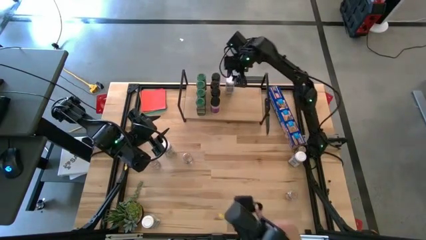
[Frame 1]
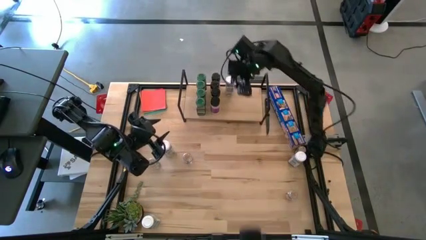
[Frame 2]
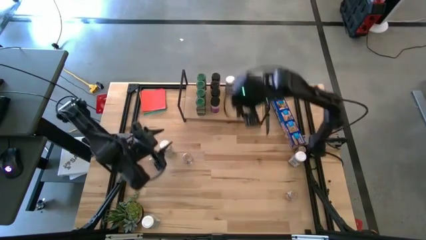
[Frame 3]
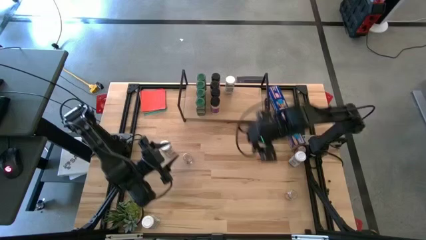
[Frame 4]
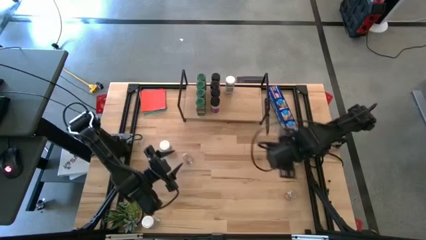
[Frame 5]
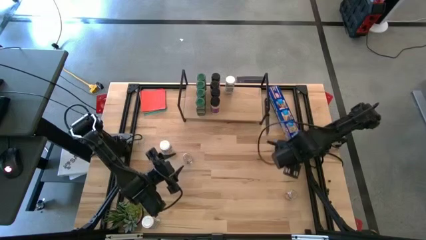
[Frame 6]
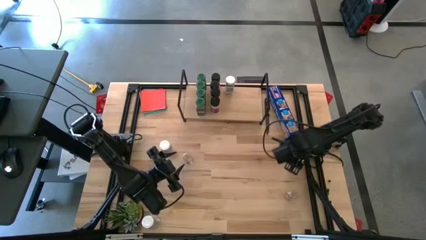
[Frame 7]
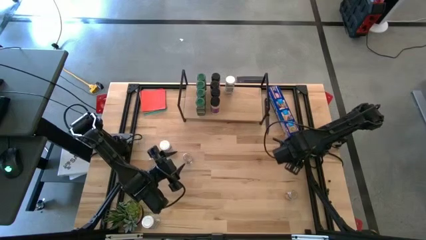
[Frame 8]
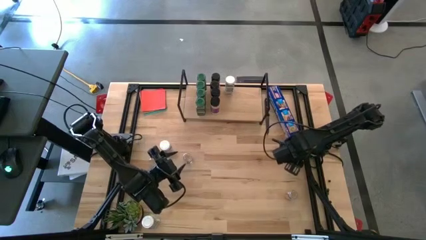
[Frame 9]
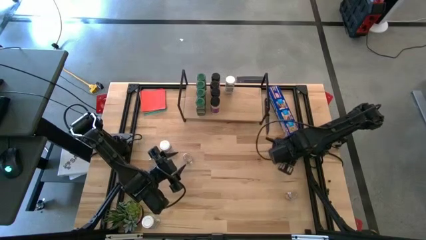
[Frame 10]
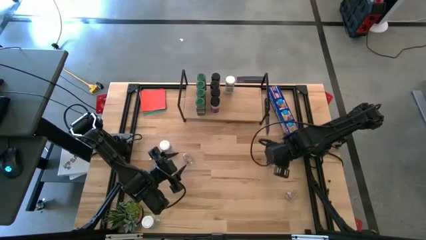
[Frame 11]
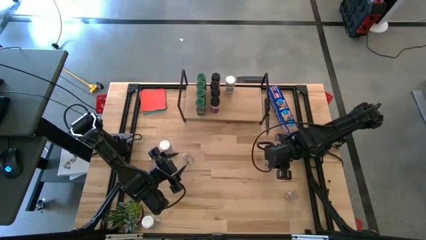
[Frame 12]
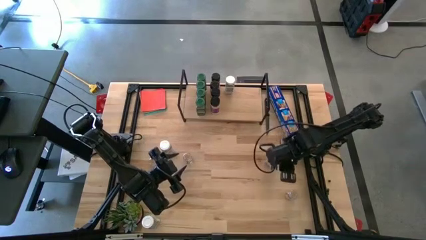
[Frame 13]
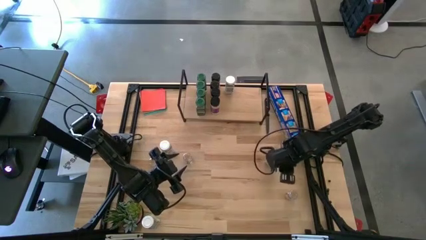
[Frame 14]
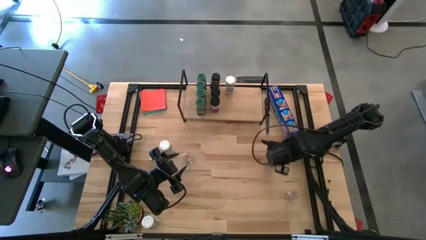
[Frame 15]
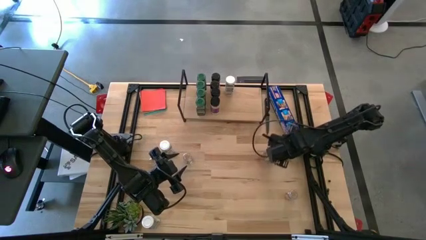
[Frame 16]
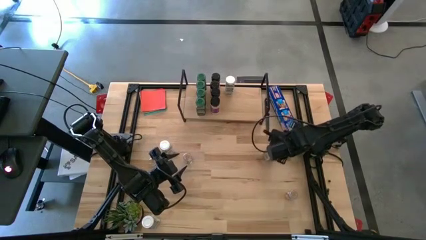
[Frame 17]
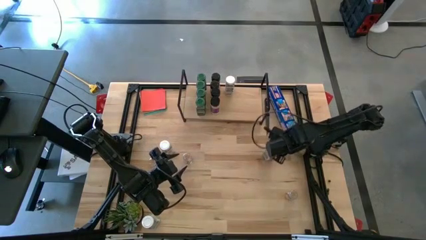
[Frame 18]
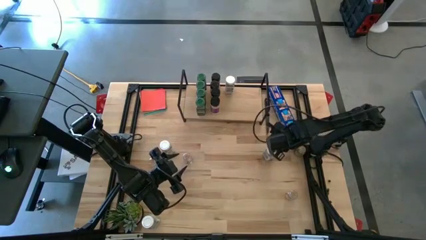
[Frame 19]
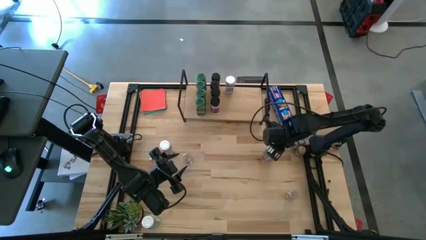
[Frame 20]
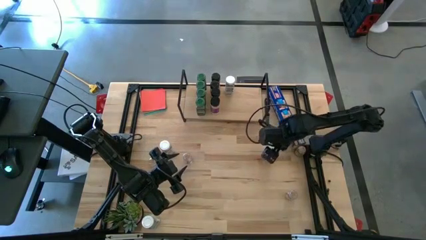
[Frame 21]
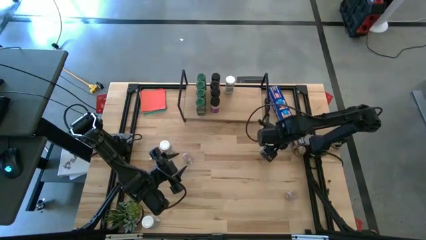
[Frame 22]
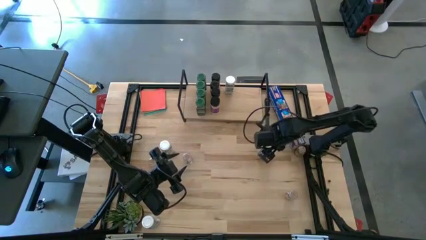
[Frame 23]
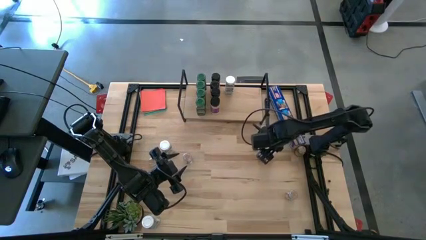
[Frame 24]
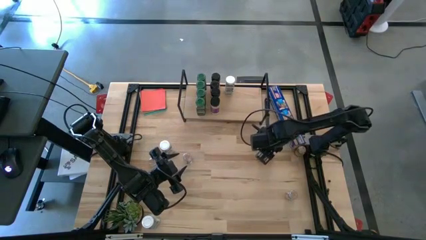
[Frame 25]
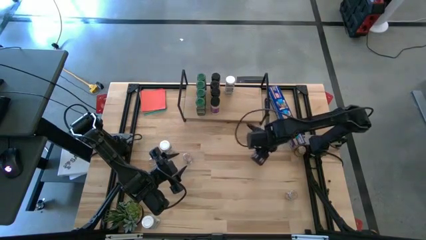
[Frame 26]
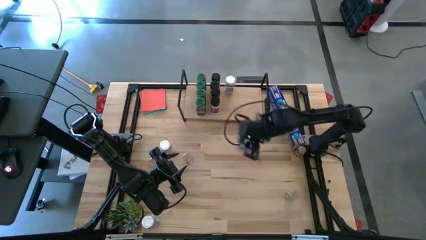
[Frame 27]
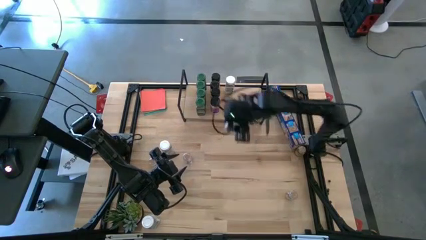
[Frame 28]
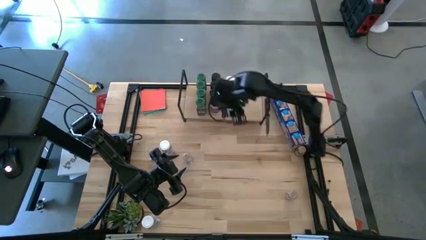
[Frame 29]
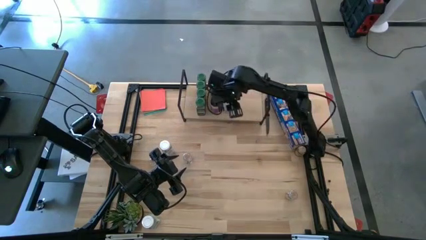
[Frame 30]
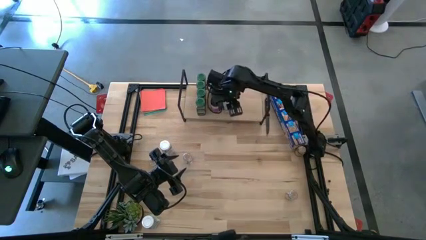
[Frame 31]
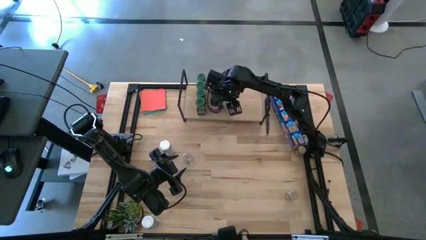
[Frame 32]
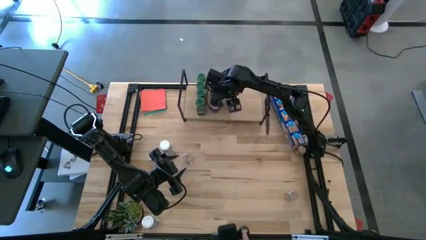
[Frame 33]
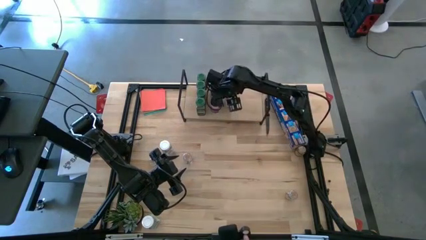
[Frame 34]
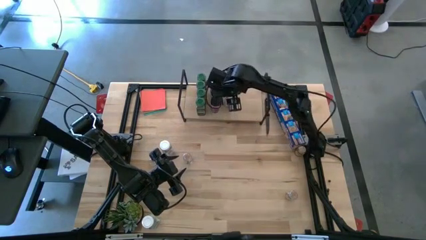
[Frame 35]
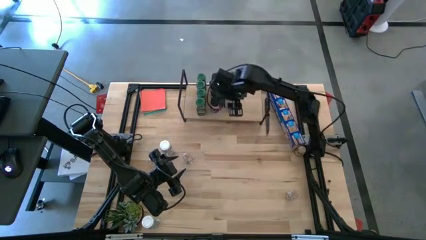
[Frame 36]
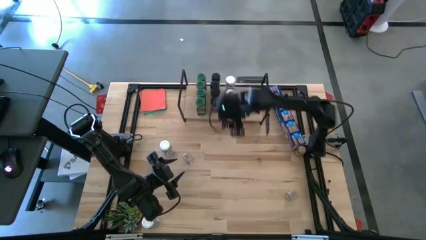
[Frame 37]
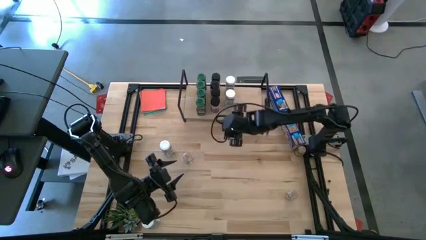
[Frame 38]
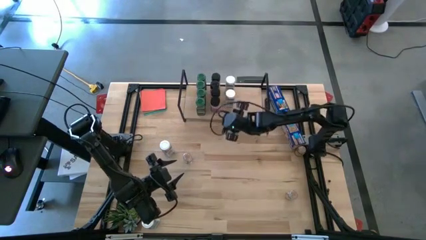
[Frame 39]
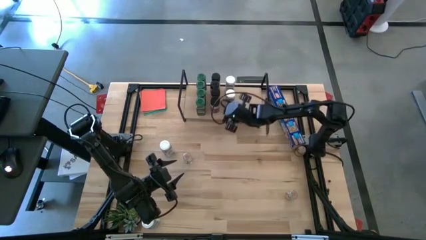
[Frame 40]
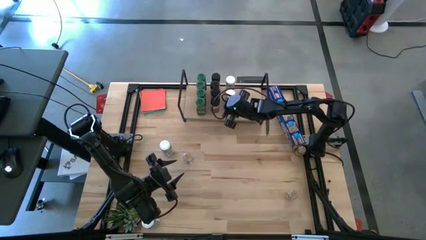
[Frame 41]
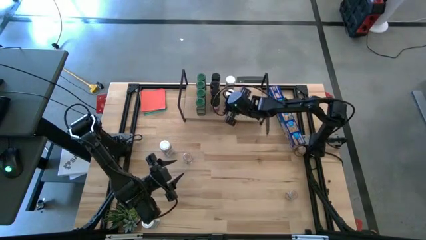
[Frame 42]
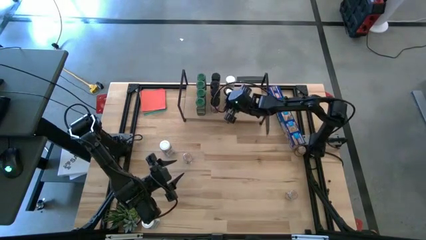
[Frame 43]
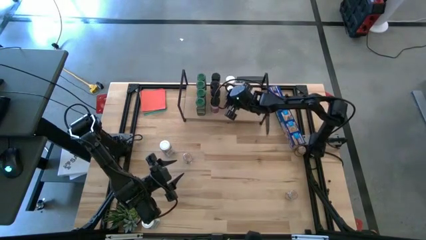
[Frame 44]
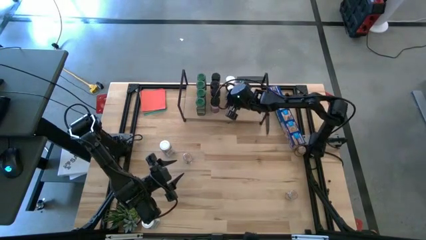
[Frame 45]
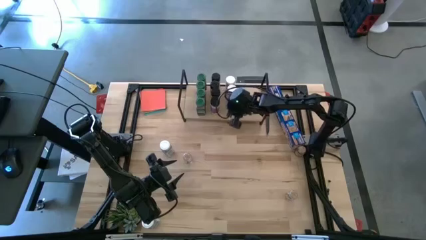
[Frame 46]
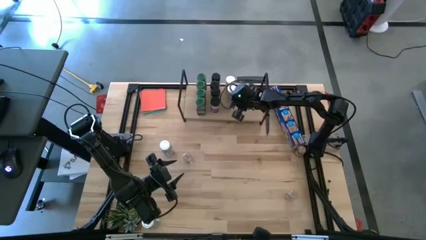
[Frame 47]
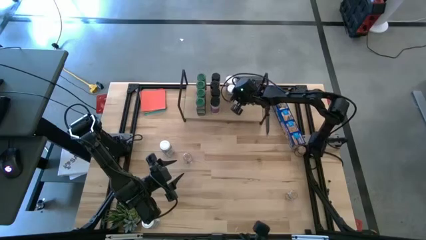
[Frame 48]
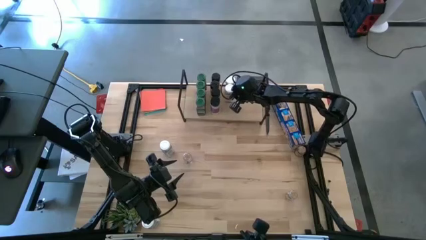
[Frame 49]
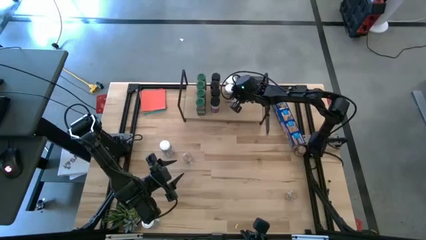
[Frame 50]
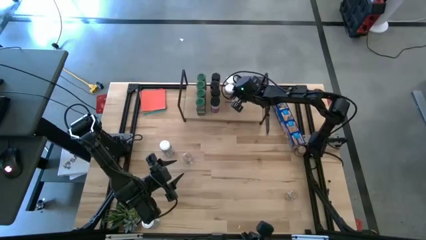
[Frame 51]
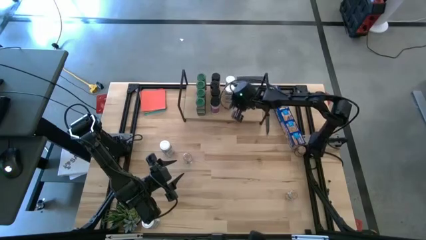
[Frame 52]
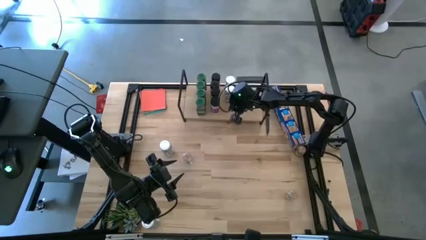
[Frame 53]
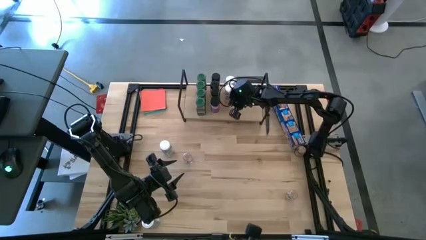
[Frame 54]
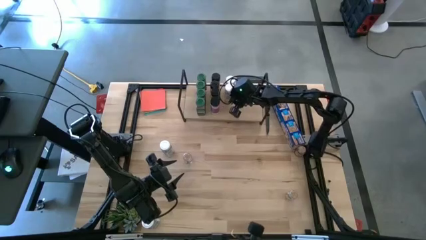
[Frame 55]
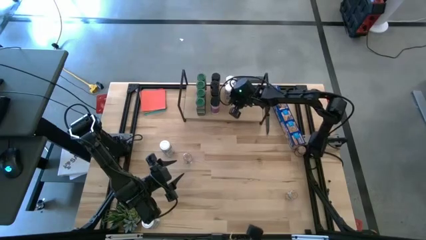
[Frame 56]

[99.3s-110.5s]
Task: Shelf spices
Put the top right white seasoning bottle on the shelf aligned with the other white seasoning bottle

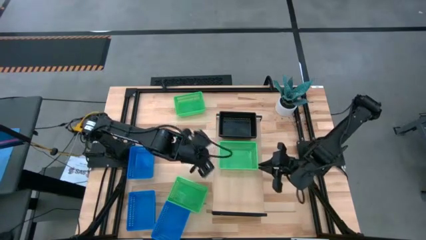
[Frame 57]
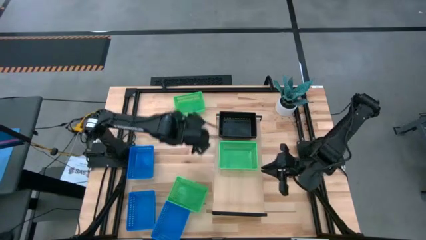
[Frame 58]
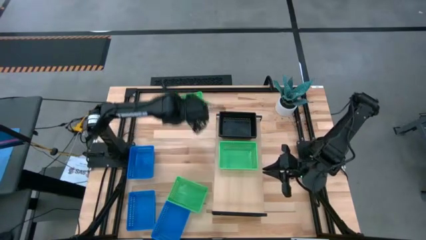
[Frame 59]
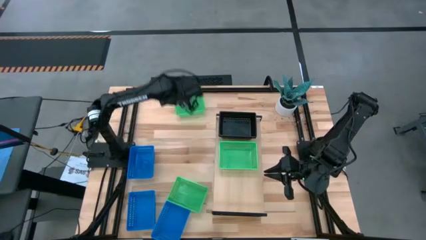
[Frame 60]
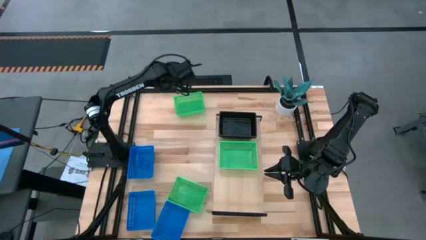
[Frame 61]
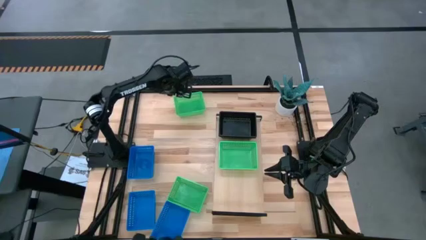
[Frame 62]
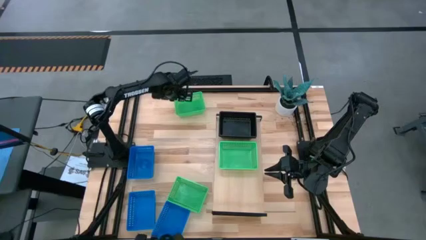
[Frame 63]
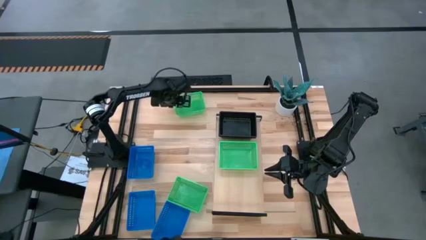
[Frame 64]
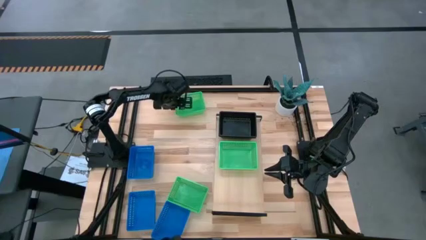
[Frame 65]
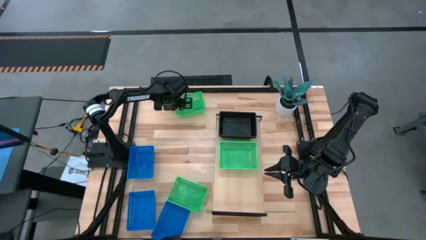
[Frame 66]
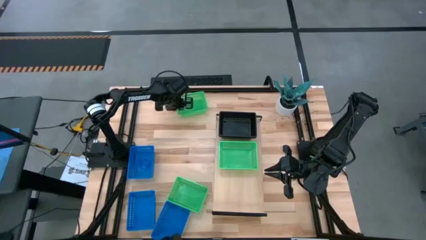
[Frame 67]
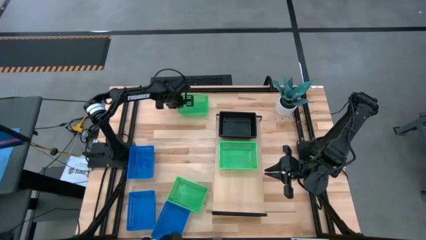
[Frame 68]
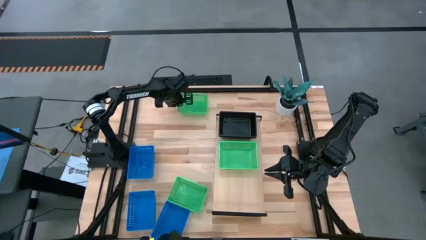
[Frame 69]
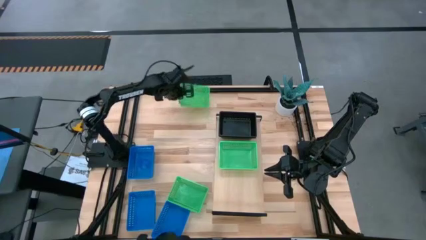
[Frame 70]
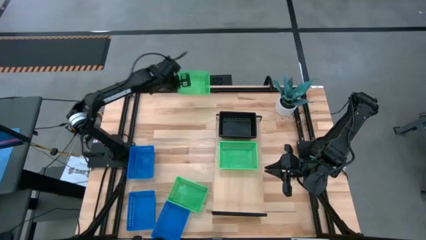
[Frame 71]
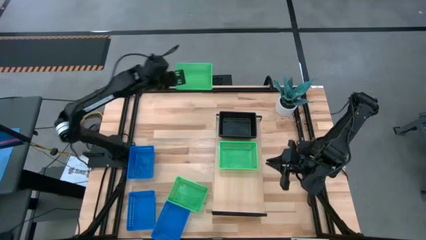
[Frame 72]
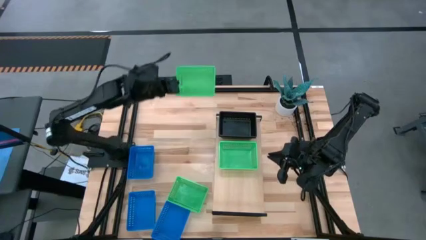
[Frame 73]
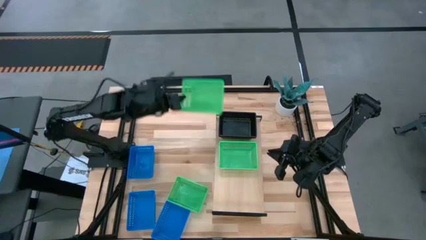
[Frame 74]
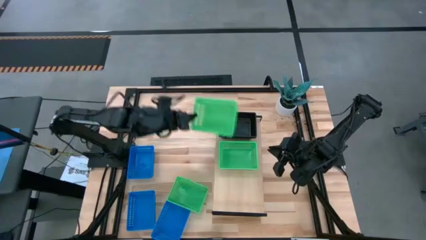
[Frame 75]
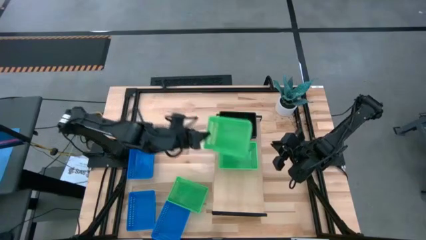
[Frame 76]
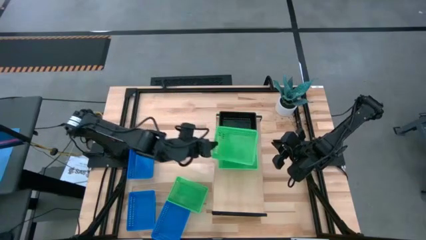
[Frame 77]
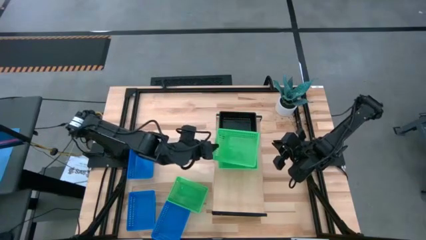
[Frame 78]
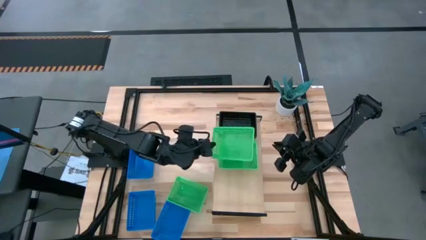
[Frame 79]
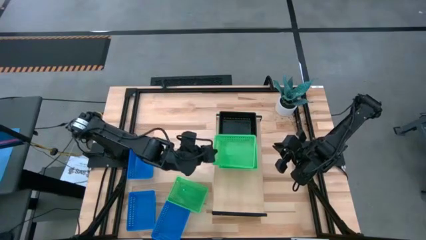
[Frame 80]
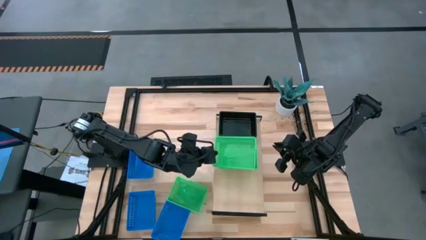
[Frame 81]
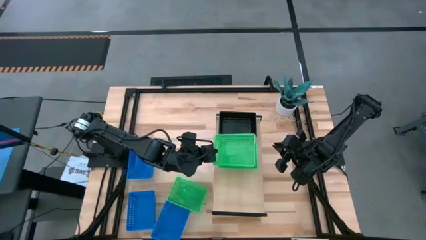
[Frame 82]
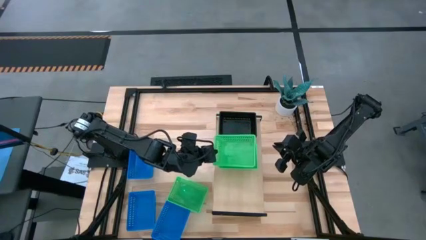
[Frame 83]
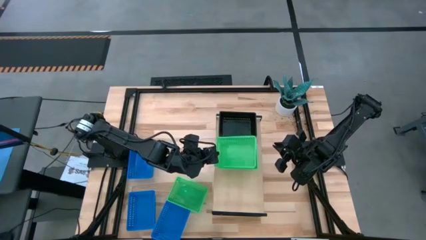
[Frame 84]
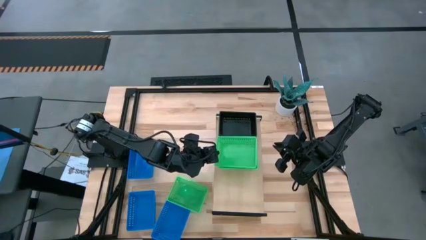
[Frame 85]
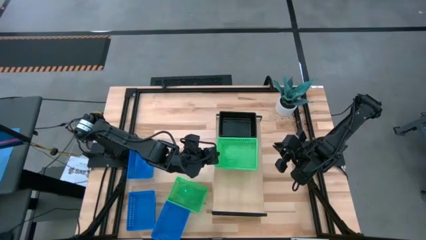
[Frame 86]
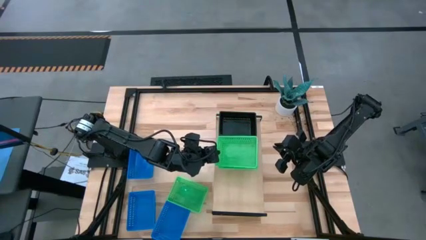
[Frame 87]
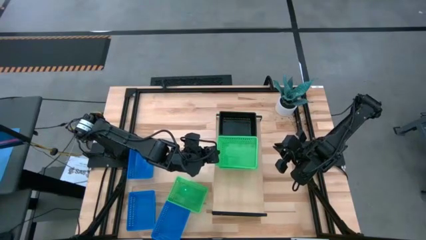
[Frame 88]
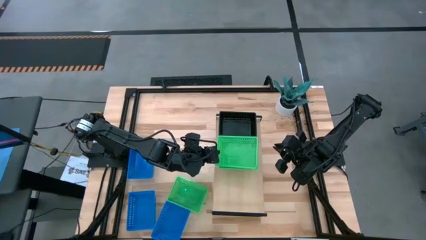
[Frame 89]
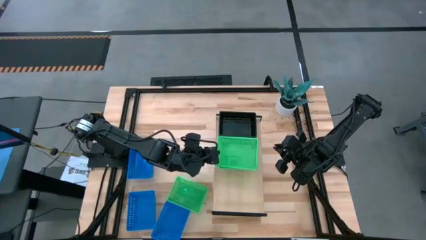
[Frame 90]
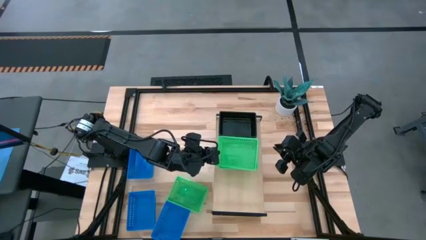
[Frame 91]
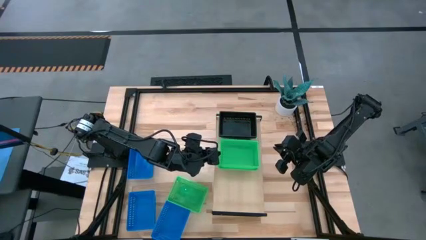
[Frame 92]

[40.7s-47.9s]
Task: Stack baskets on shelf by color
Stack the top green bin into the green bin on the shelf
